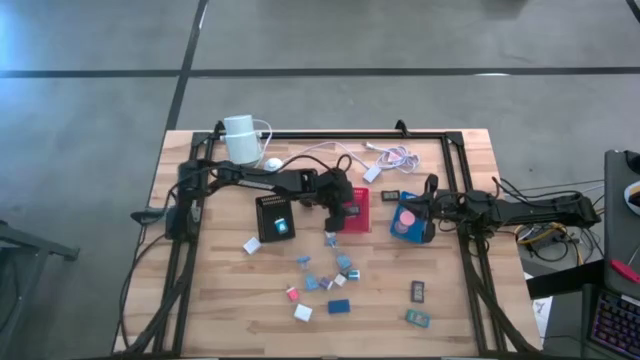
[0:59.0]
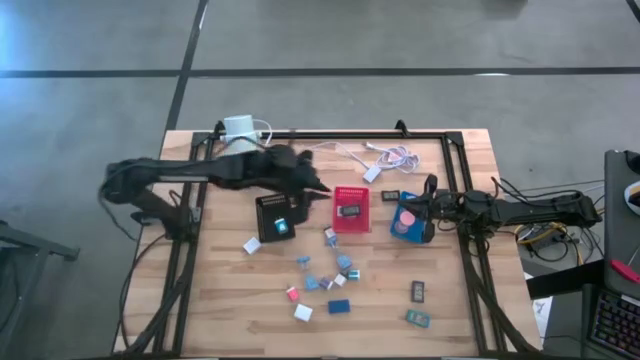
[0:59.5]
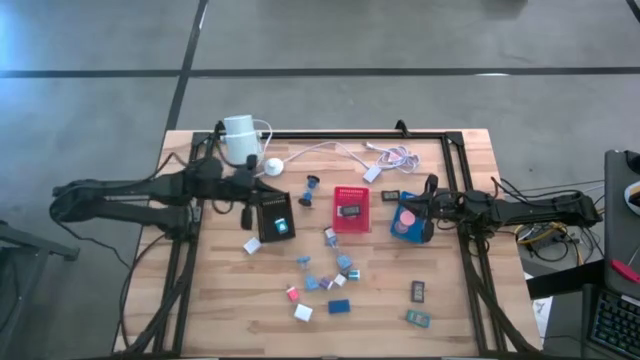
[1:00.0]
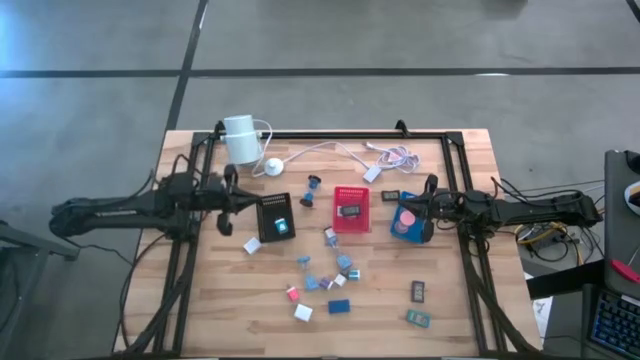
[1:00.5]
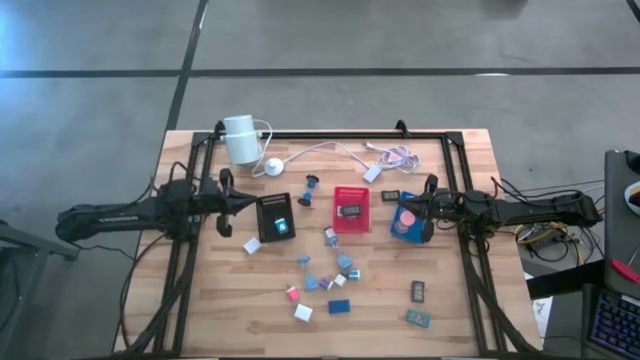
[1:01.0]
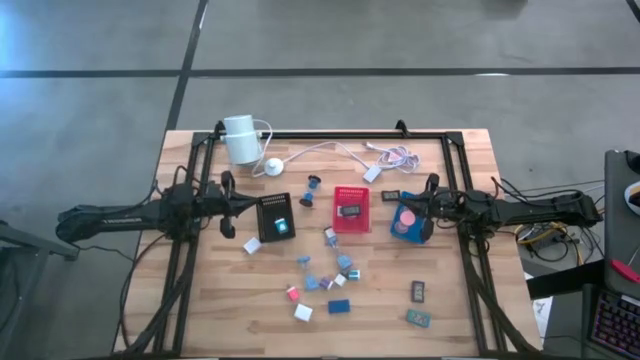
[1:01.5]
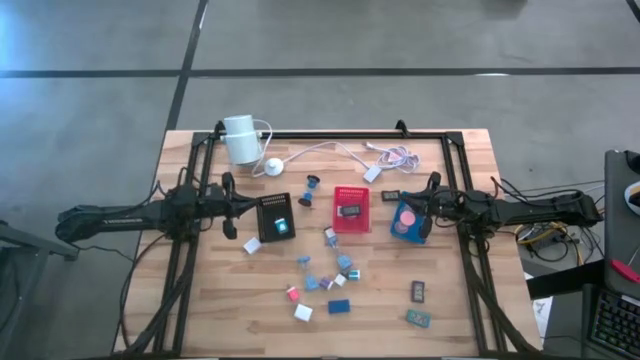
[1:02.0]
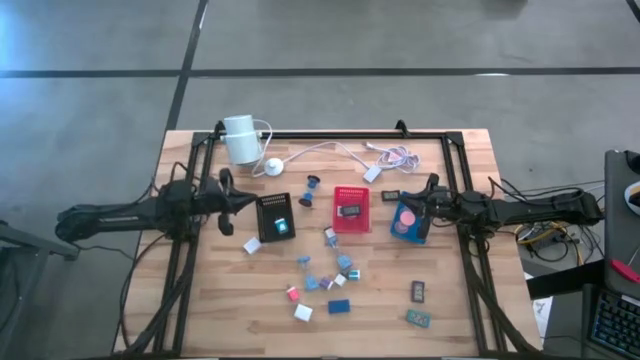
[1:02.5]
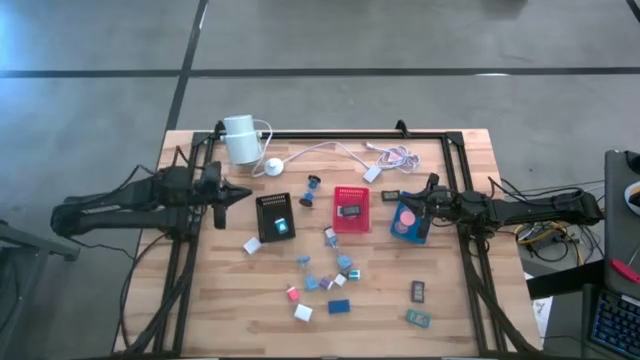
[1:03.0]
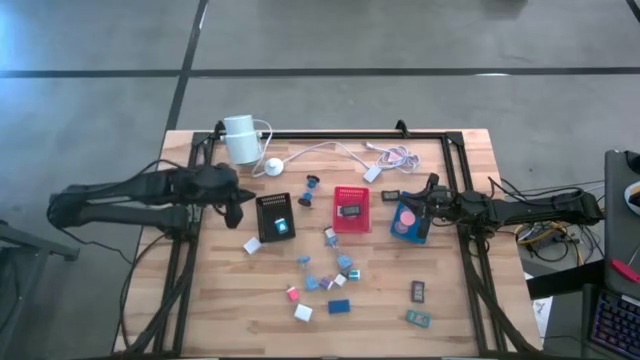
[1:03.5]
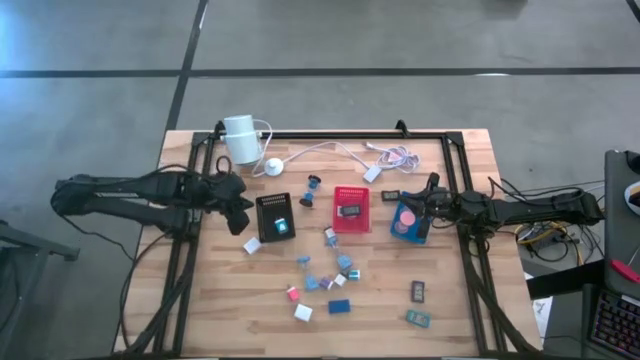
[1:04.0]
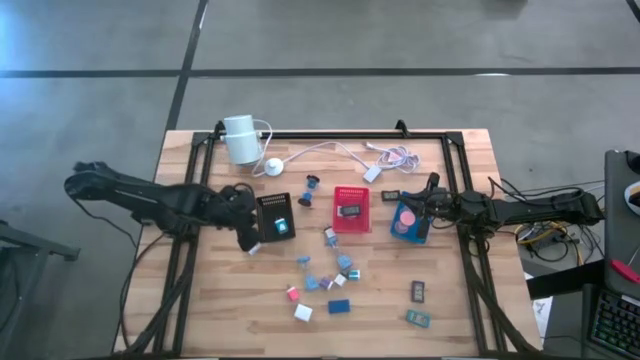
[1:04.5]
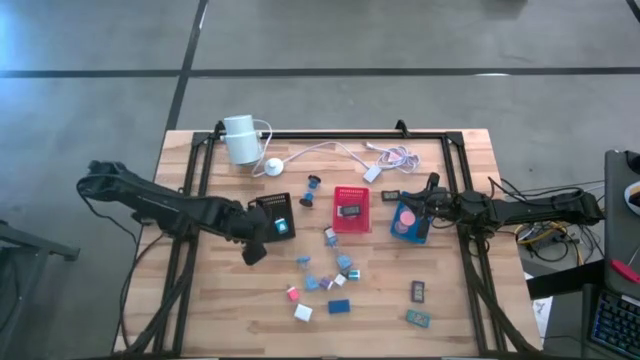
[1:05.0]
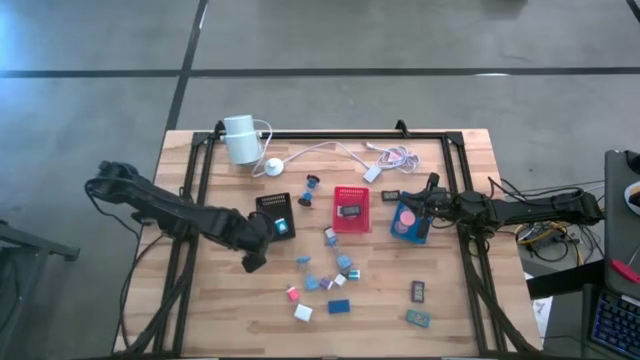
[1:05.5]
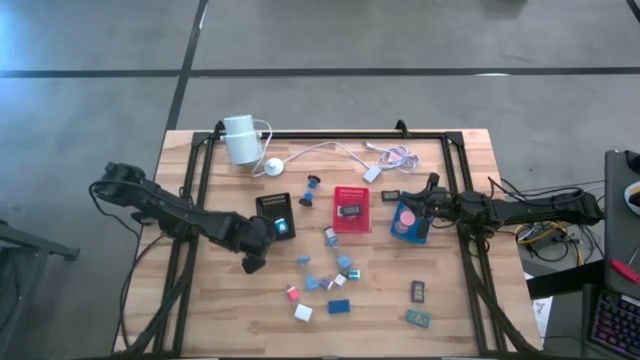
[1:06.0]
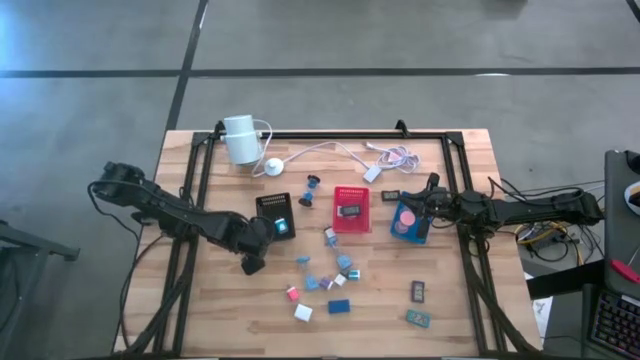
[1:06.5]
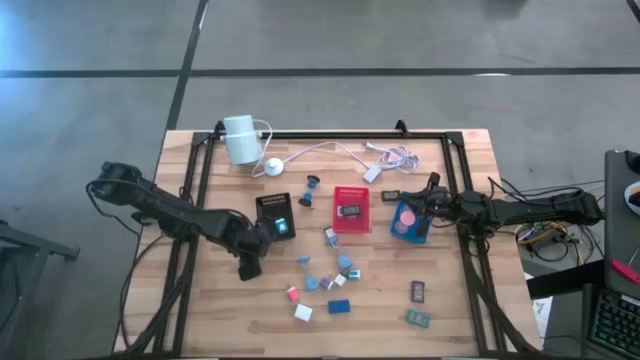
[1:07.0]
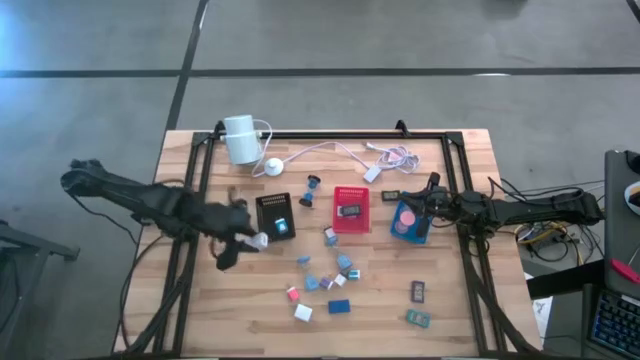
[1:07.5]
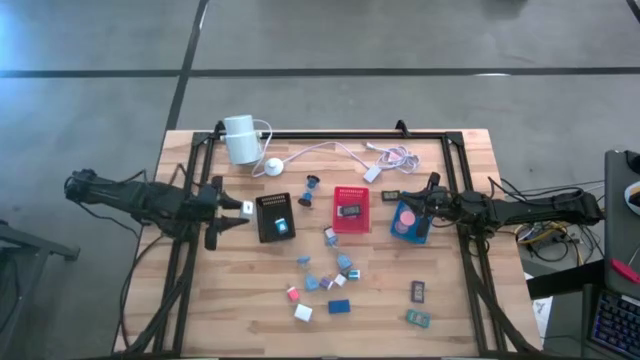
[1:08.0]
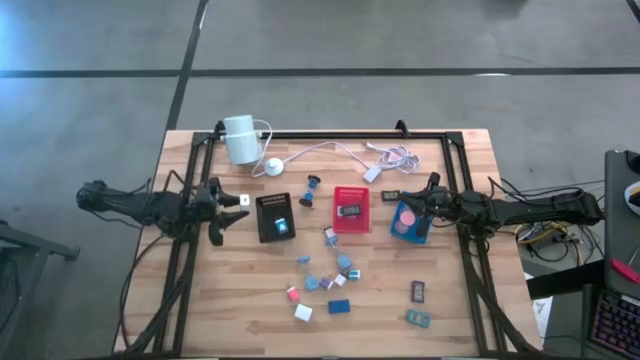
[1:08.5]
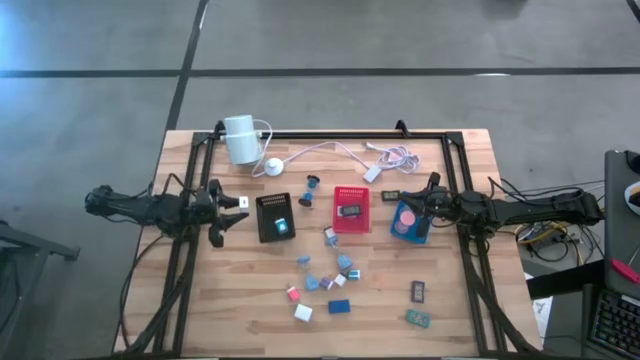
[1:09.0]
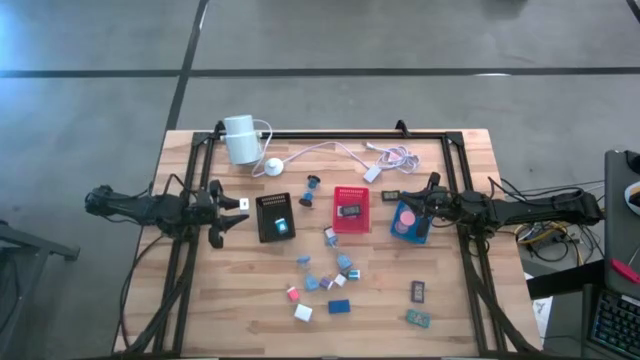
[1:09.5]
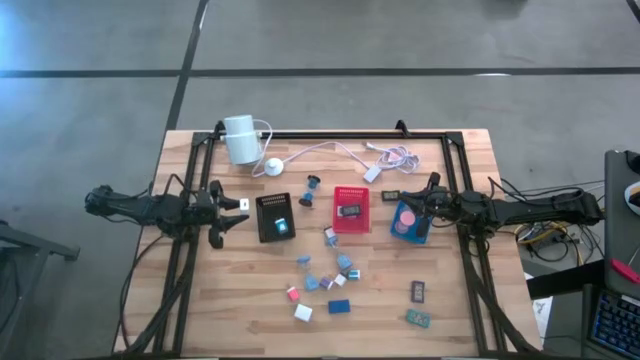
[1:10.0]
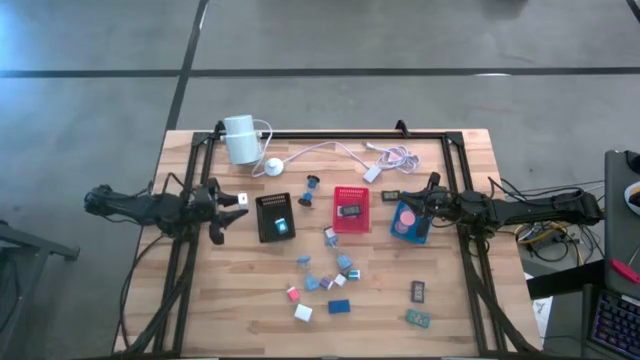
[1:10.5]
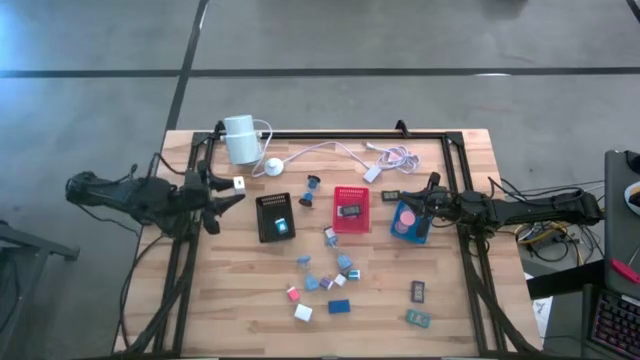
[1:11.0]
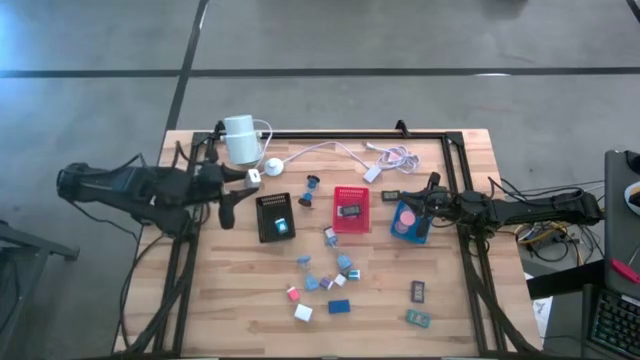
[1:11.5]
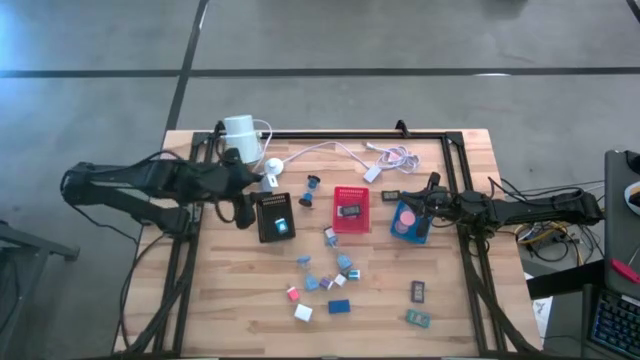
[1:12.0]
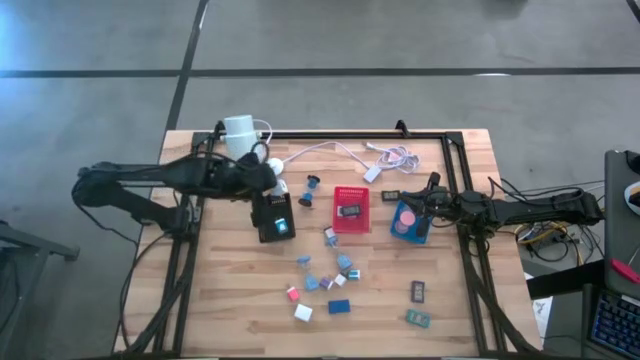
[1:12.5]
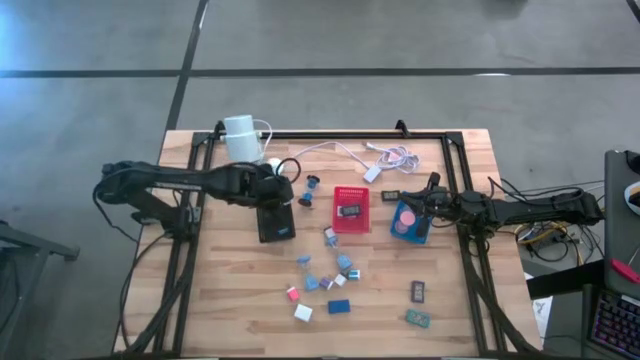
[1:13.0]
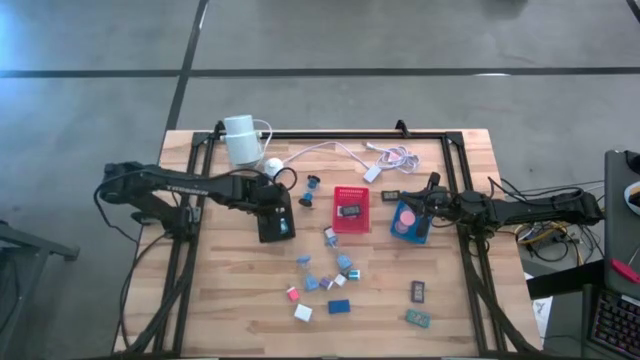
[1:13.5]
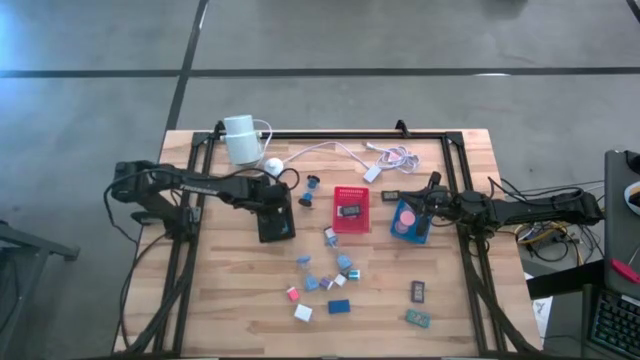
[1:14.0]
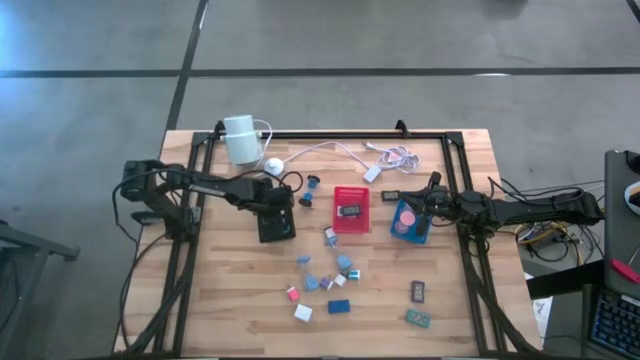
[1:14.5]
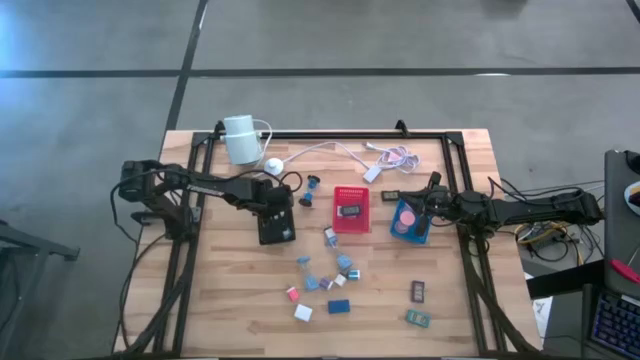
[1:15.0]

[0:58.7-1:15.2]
Task: Pick & Place Office items
Put the top white charger adapter into the black bin

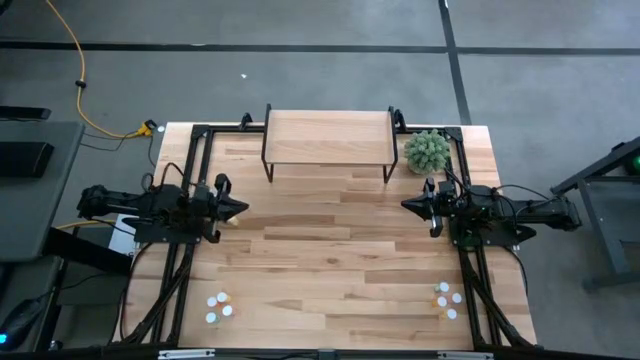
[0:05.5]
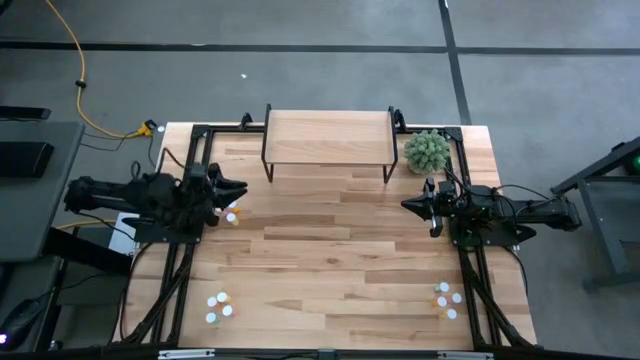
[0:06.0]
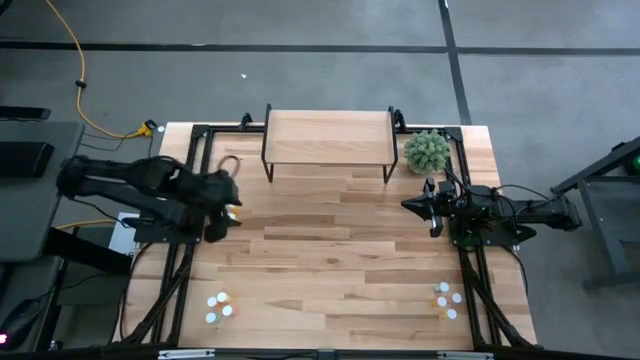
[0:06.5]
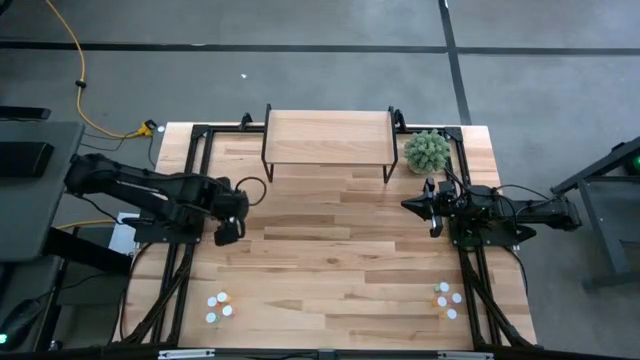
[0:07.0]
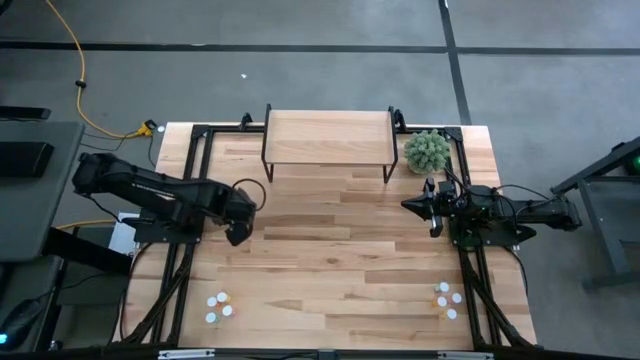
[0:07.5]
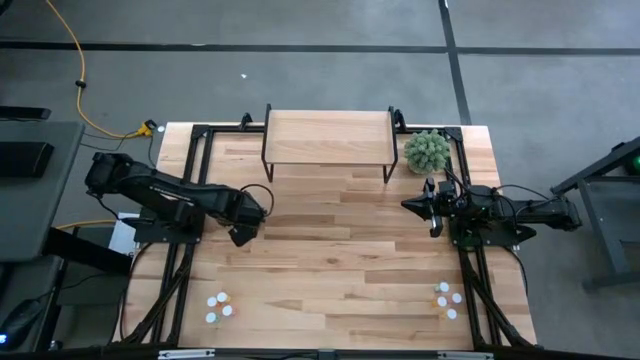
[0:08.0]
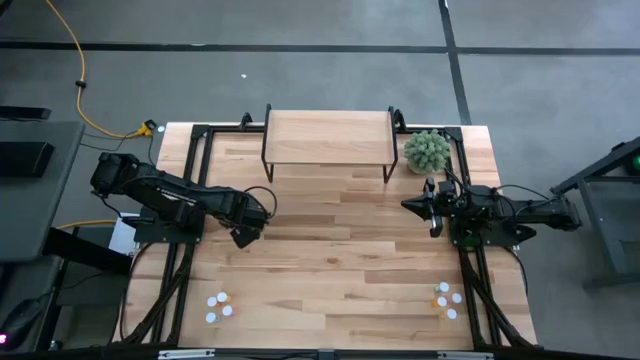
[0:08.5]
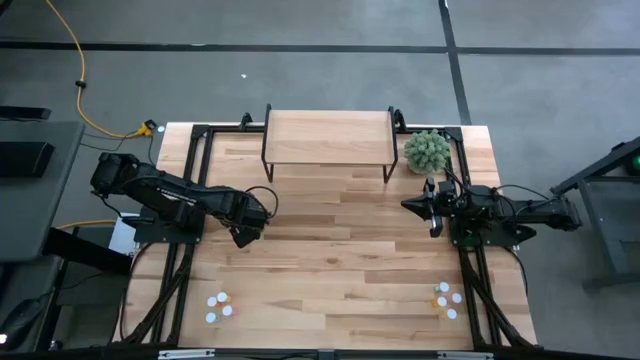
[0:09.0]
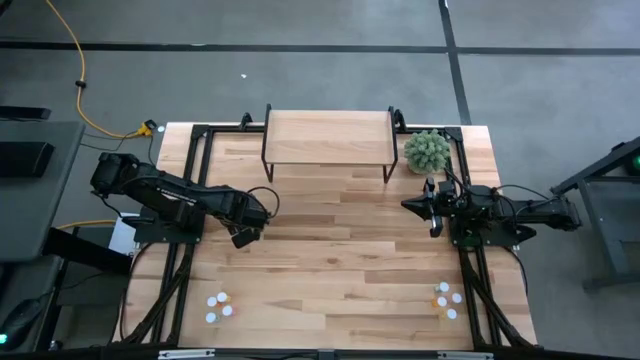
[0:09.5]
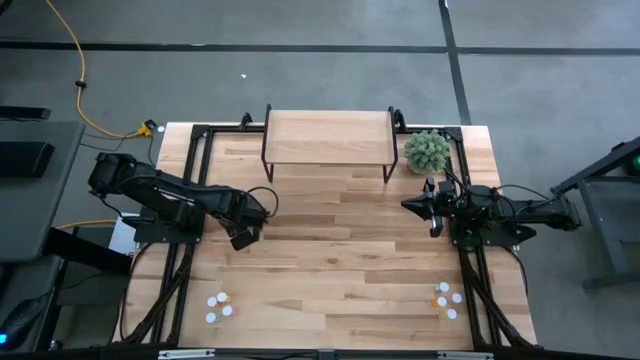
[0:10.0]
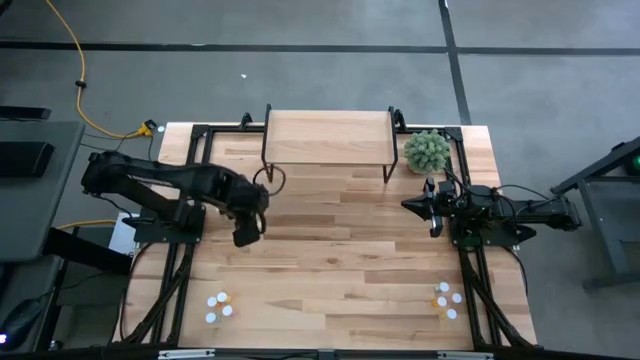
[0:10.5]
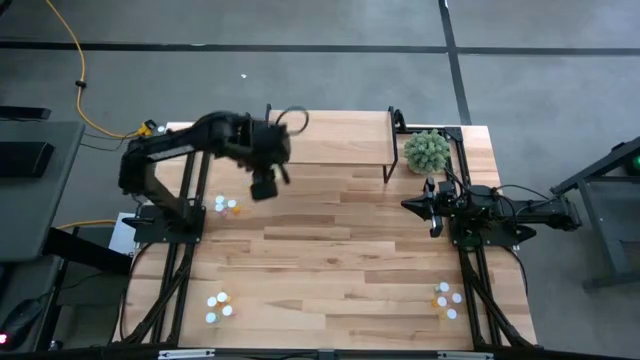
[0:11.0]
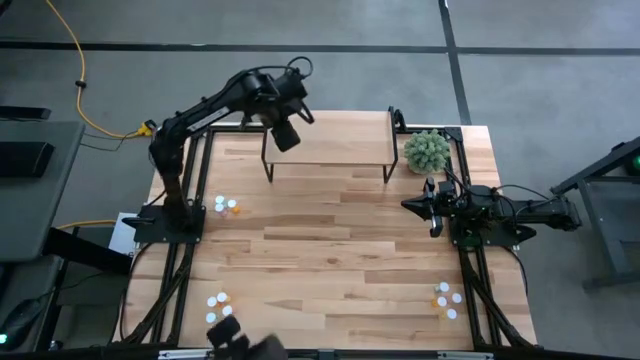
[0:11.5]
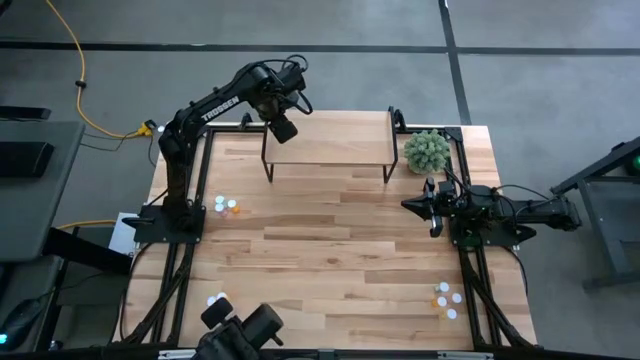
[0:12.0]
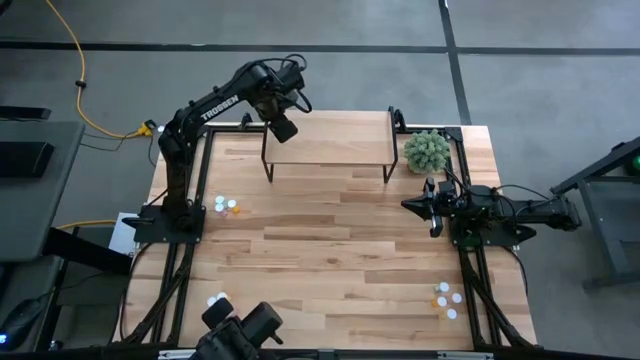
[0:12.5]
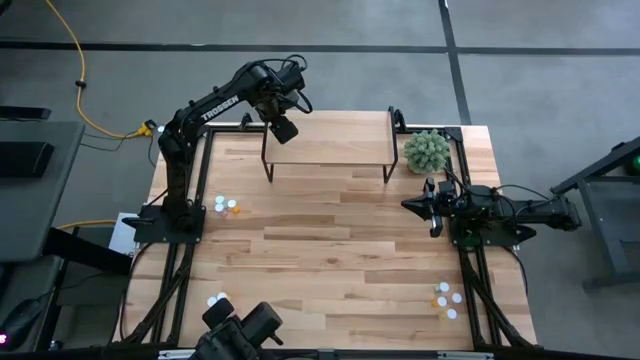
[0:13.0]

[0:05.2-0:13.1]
Task: Pick and place medicine bottles onto shelf by color
Put the top yellow pill bottle on the shelf
